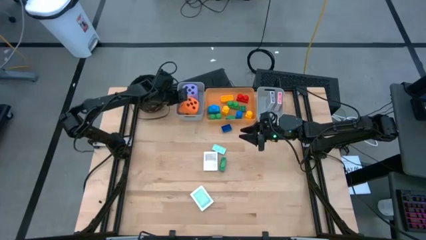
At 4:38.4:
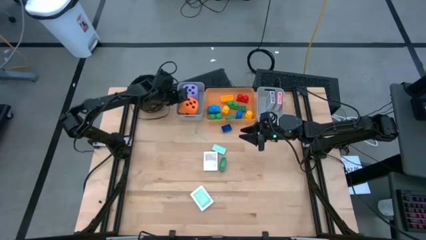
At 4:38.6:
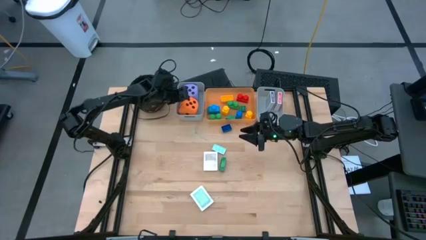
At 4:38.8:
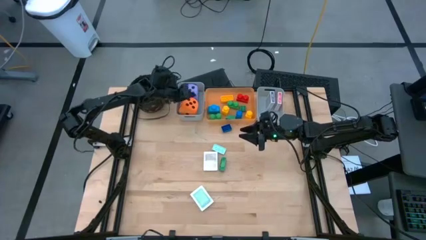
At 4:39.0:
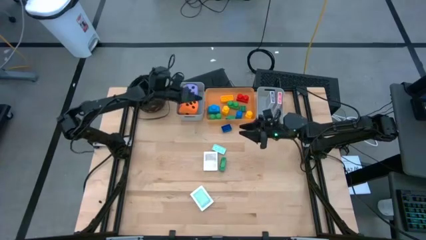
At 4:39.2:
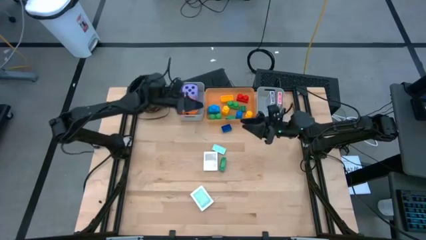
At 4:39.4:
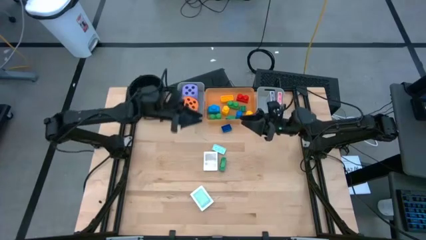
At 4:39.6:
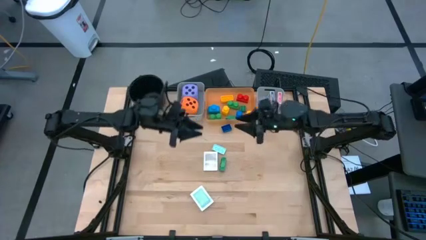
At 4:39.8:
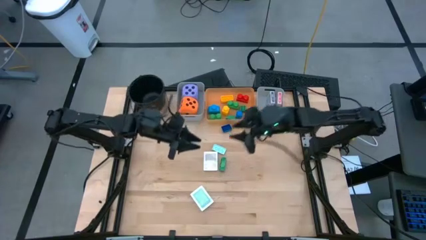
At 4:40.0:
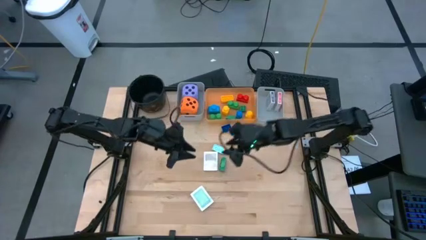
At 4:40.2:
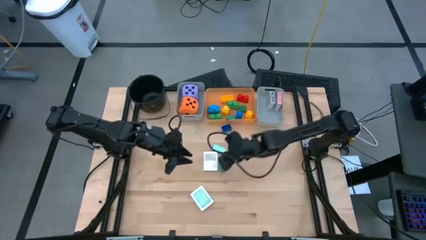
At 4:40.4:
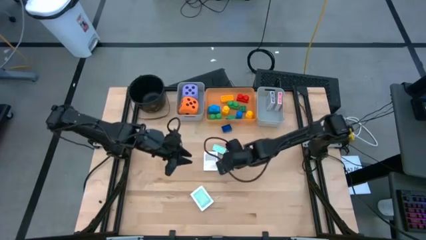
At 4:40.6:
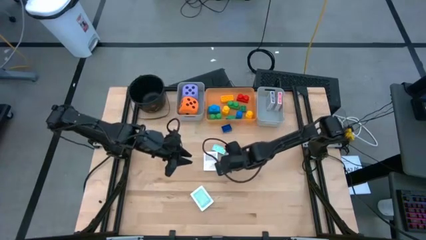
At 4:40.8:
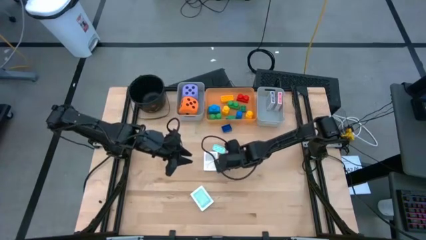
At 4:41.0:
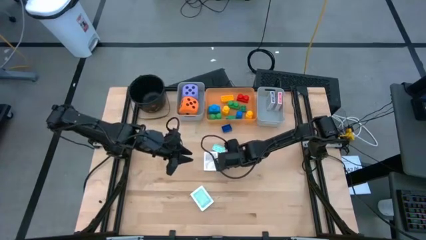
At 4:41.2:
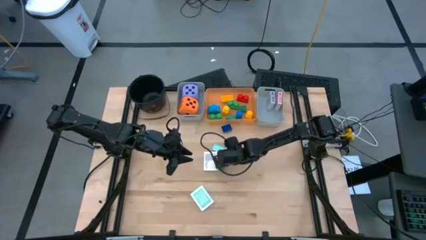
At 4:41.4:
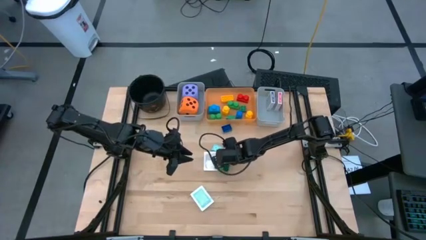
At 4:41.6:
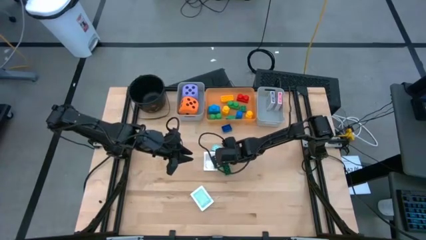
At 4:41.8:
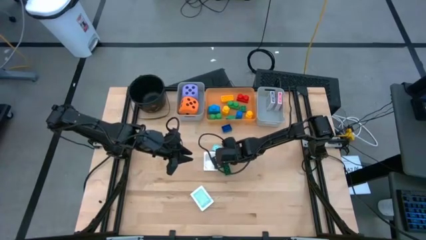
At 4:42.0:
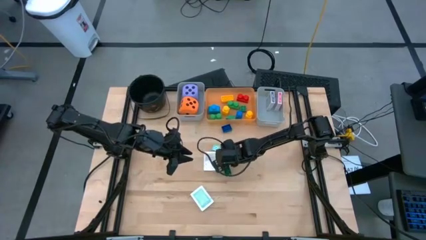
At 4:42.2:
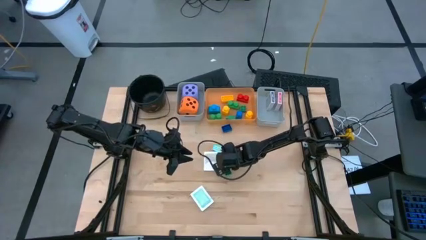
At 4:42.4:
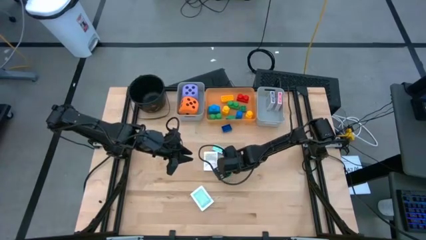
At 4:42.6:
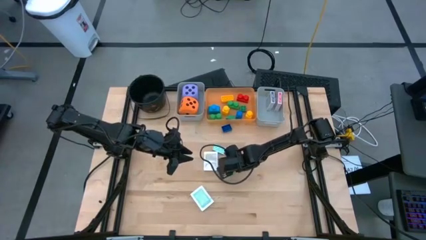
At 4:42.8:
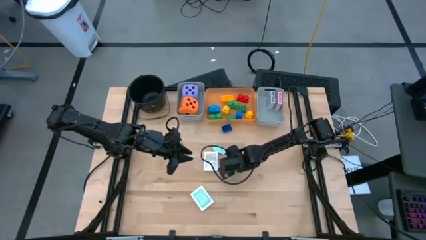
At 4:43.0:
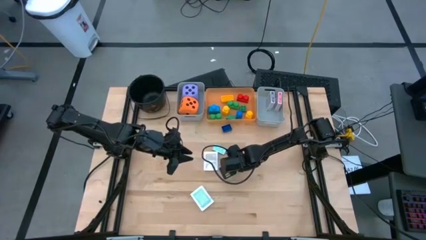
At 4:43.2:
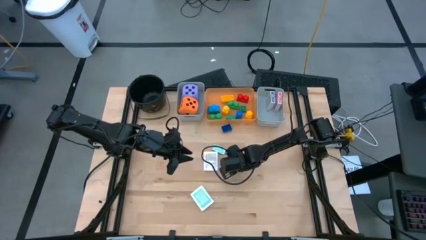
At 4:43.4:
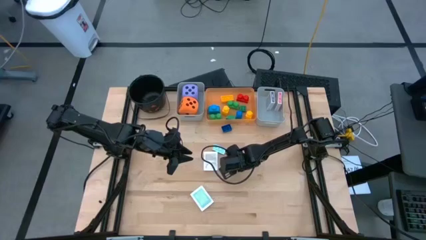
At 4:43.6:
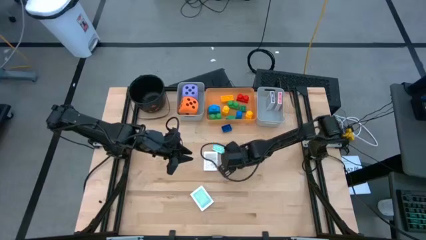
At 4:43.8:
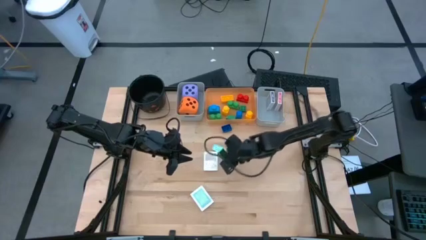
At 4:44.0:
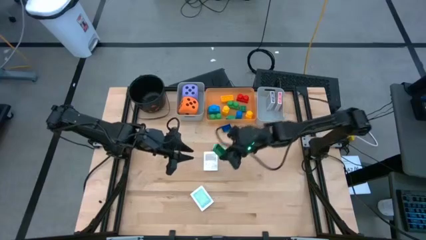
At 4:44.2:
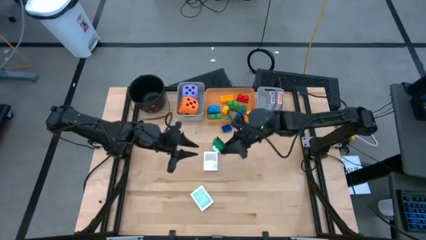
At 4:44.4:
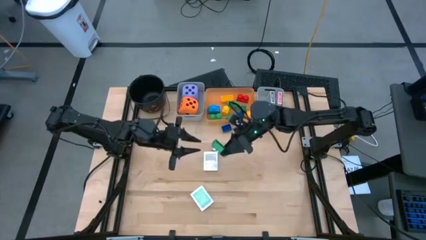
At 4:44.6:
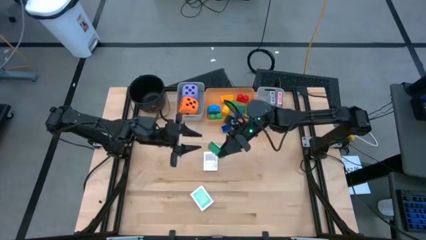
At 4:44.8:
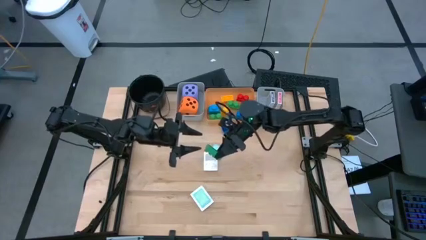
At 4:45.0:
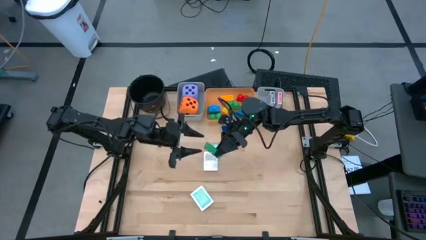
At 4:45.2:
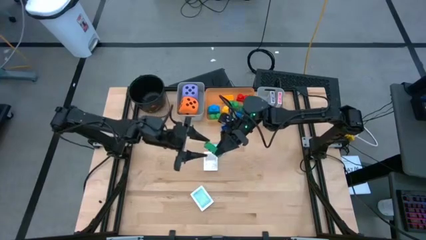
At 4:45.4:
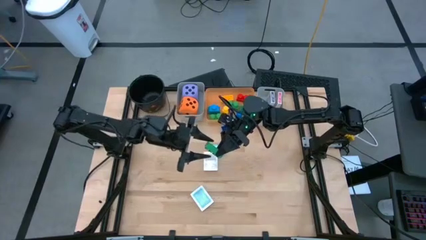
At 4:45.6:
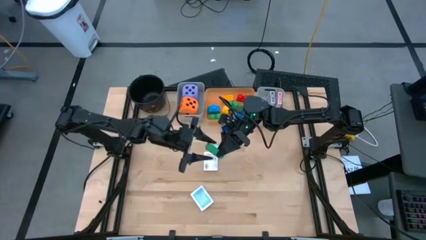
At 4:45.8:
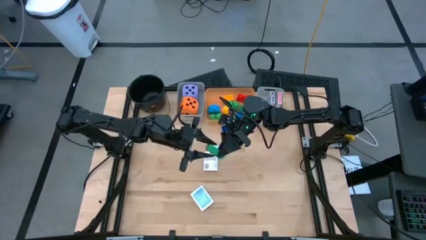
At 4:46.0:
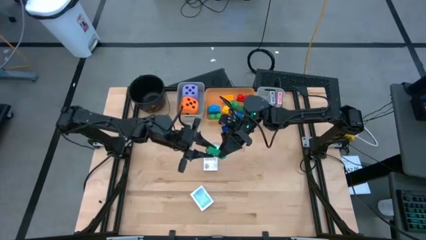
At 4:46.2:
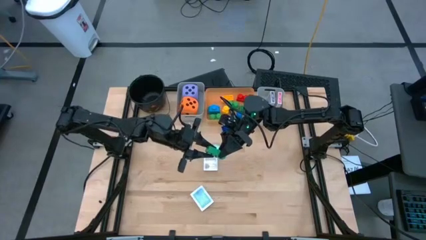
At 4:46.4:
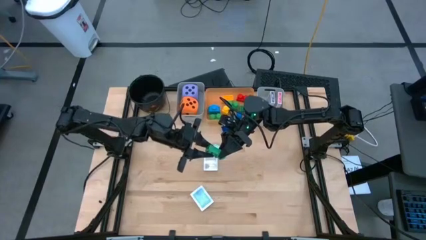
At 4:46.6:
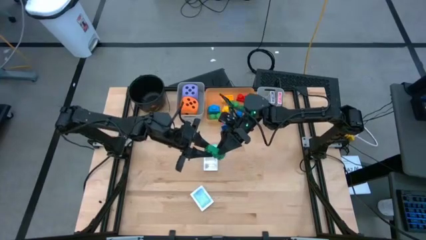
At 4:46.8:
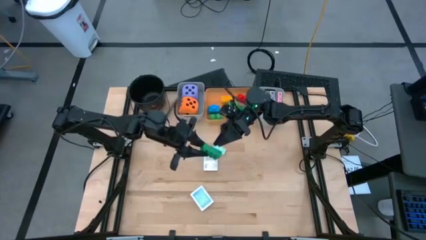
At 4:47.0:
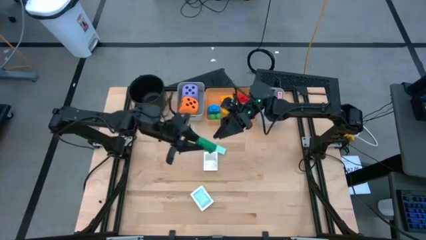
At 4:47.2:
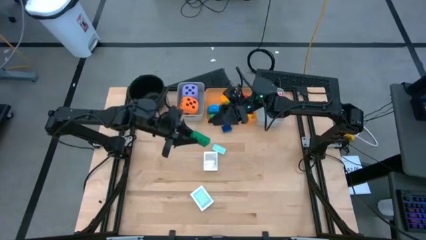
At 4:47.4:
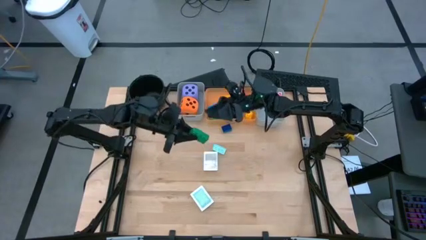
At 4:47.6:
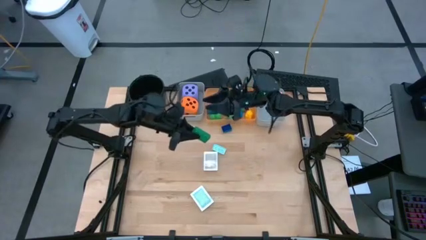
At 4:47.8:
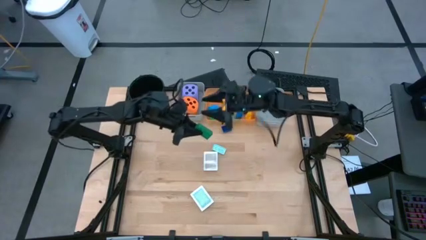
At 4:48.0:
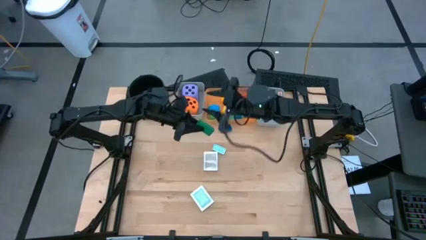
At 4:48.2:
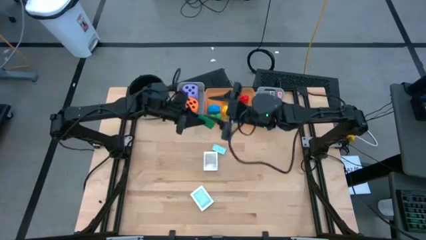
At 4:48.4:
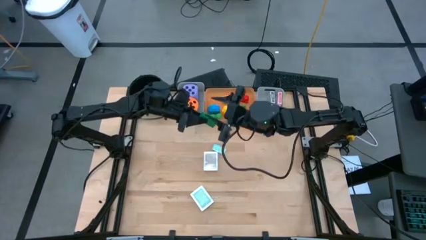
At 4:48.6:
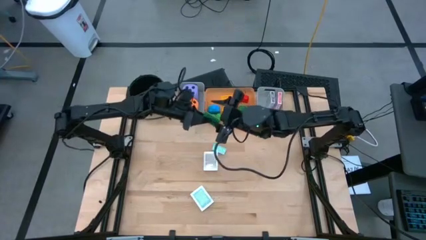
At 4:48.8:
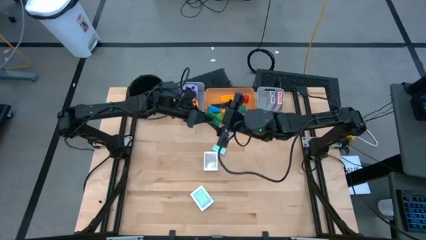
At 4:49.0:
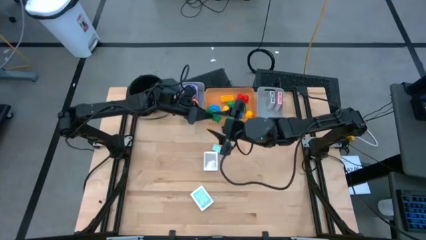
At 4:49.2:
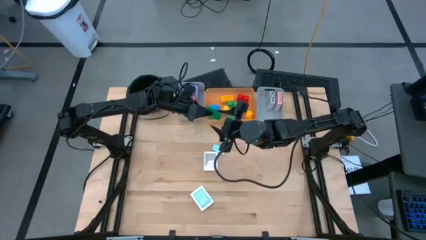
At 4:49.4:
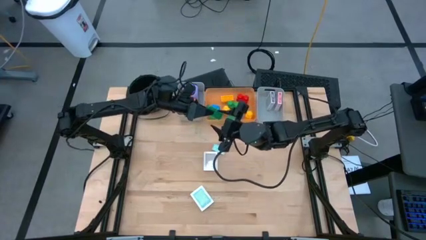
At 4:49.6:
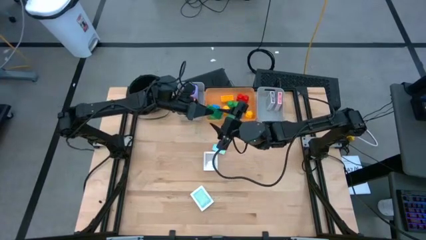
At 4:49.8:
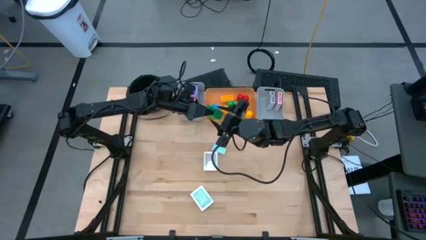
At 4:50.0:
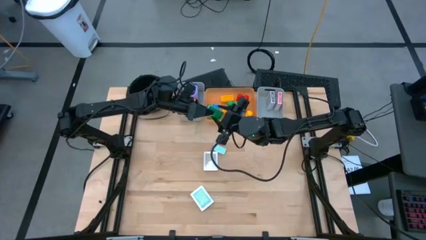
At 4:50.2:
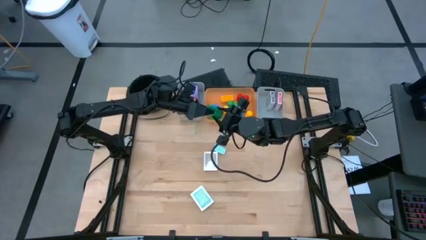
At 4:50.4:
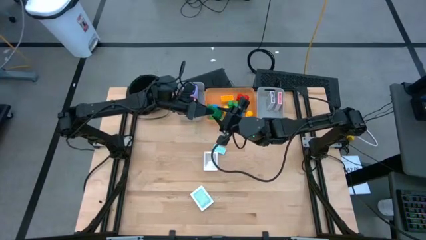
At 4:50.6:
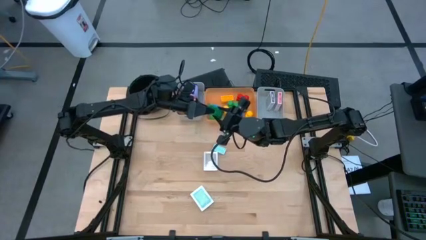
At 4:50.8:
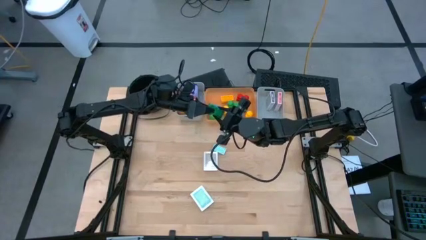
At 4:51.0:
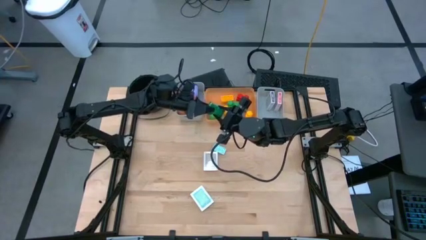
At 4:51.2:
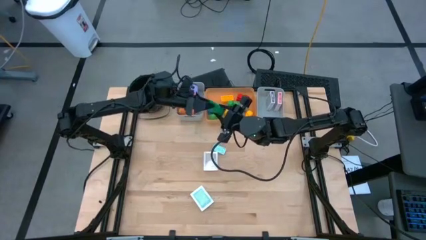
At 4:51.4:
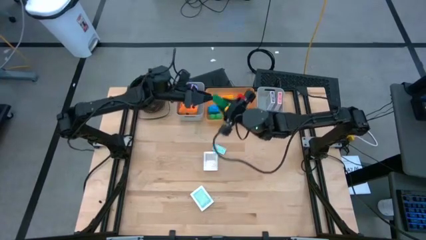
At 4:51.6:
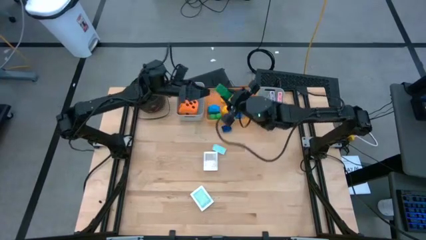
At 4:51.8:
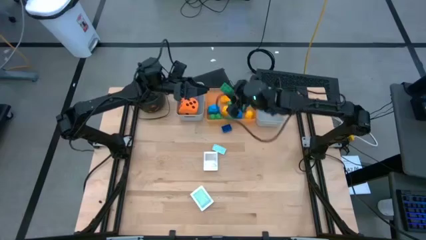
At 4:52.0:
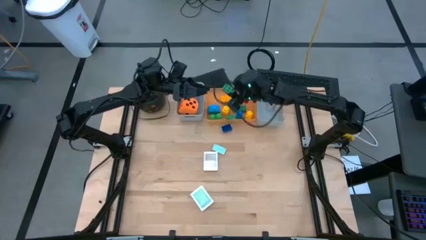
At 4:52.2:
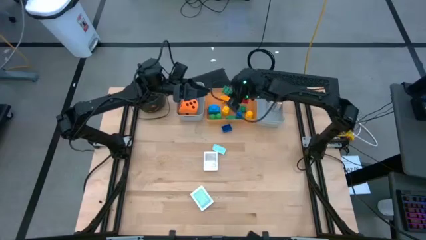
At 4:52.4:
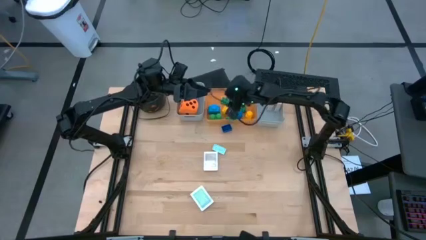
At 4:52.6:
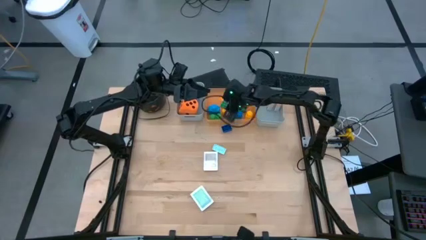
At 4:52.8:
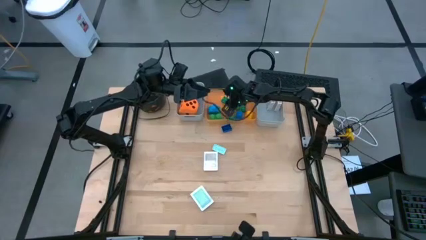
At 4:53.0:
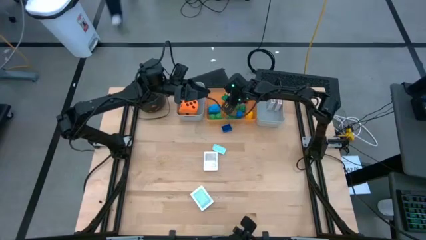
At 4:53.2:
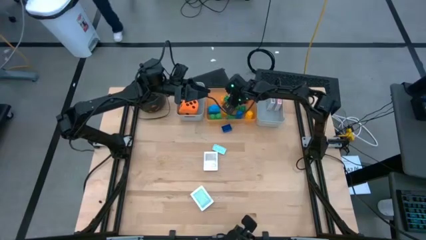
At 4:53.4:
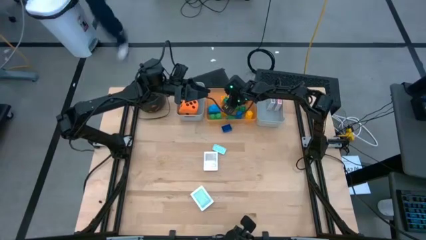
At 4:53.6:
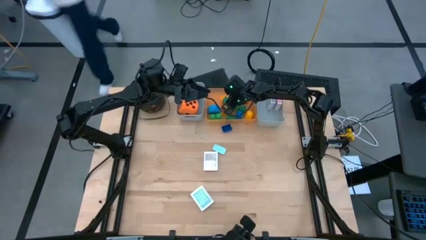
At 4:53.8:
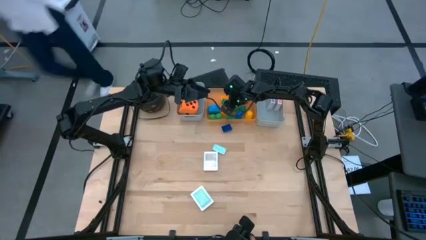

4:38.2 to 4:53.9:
Task: Pick & Place Toys
Put the dark green game piece into the orange bin
